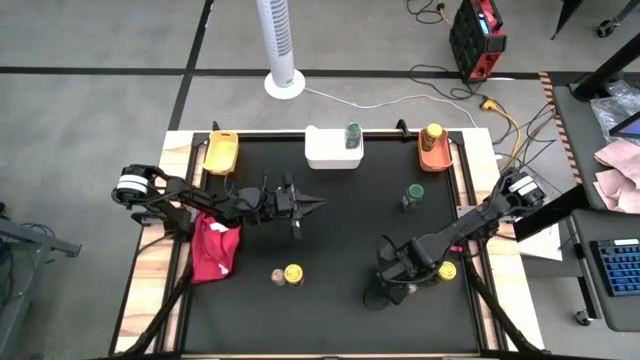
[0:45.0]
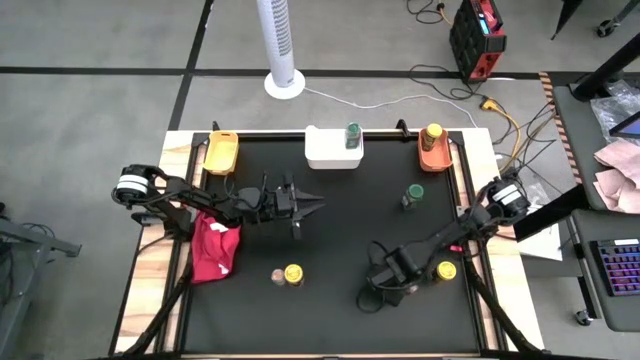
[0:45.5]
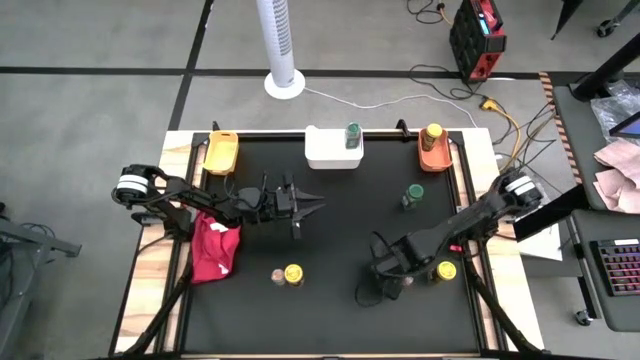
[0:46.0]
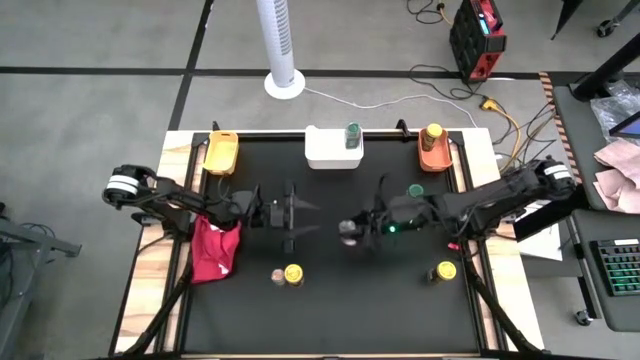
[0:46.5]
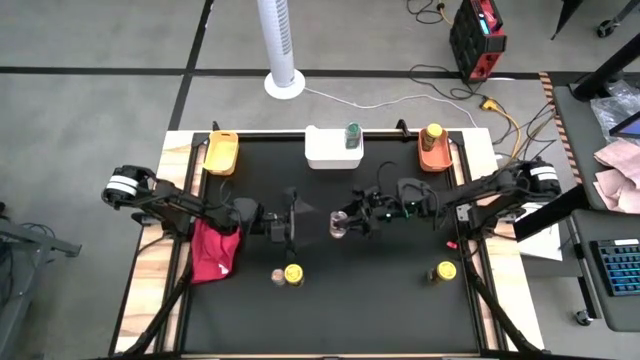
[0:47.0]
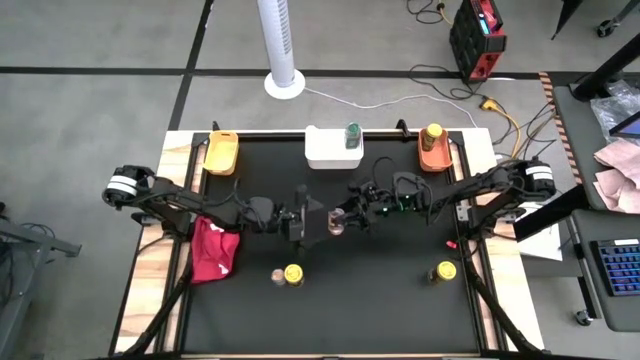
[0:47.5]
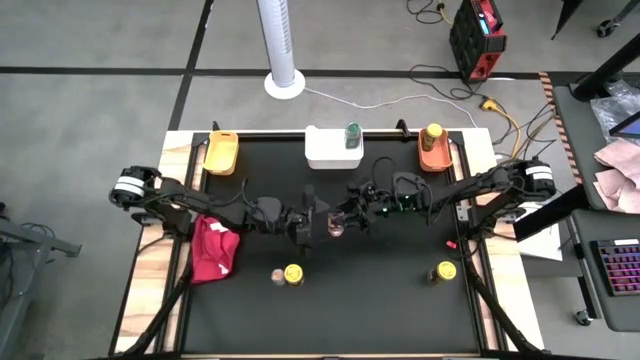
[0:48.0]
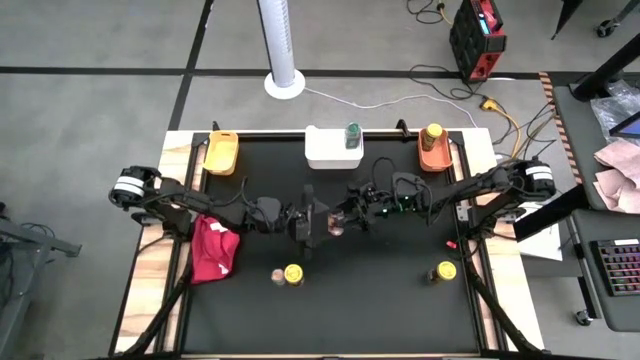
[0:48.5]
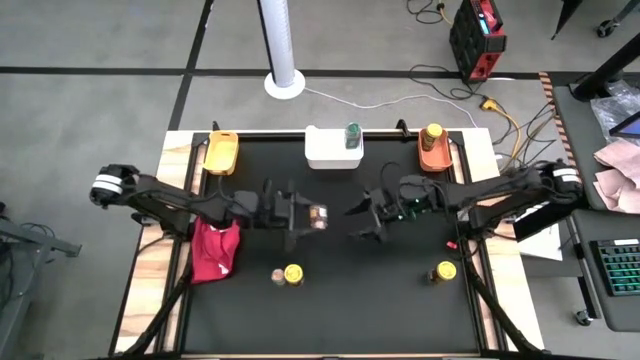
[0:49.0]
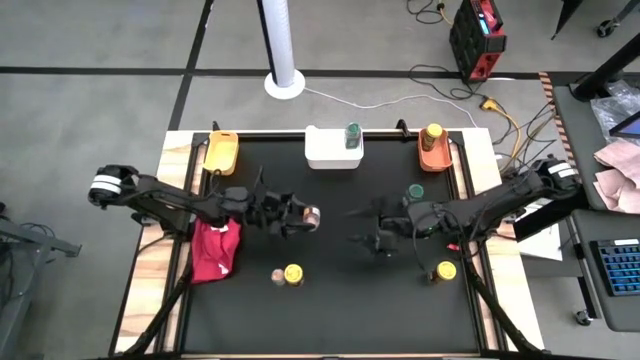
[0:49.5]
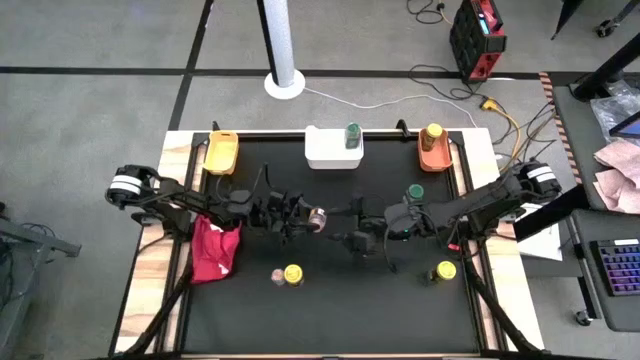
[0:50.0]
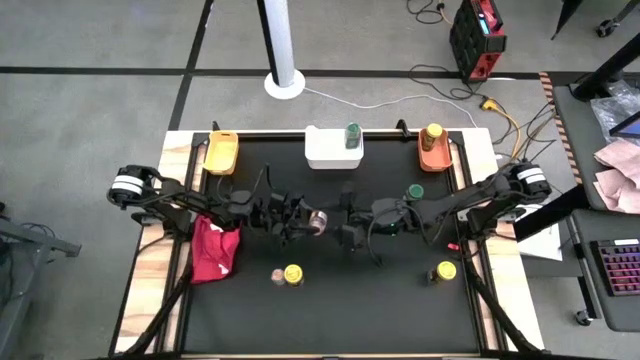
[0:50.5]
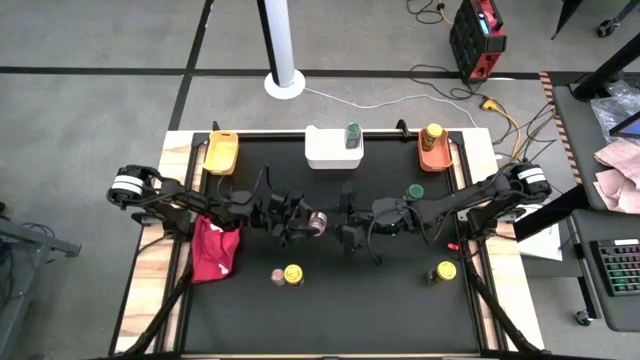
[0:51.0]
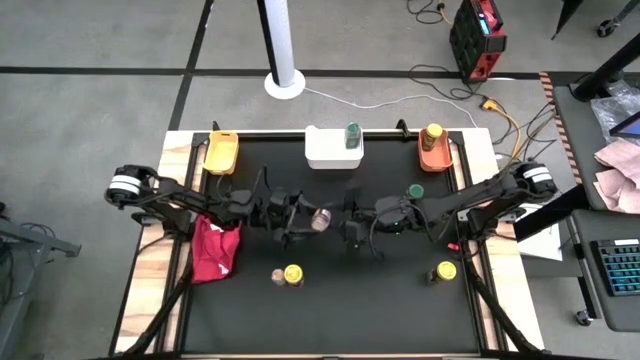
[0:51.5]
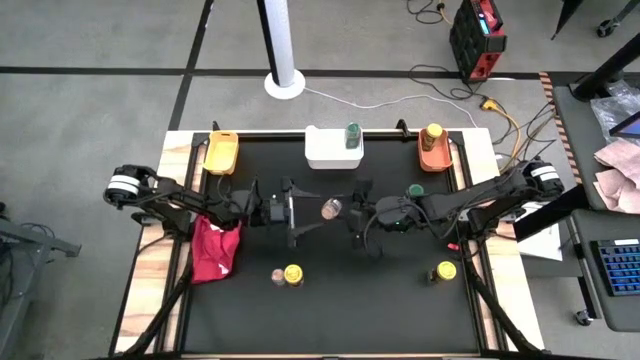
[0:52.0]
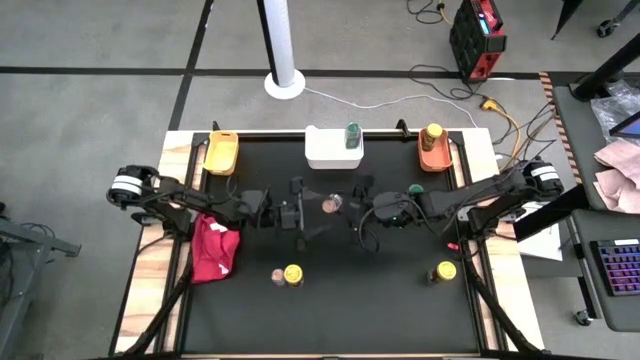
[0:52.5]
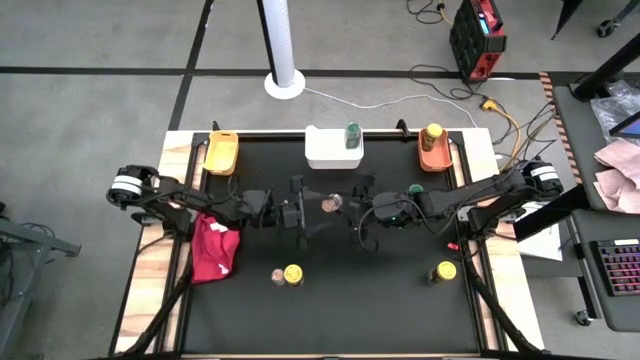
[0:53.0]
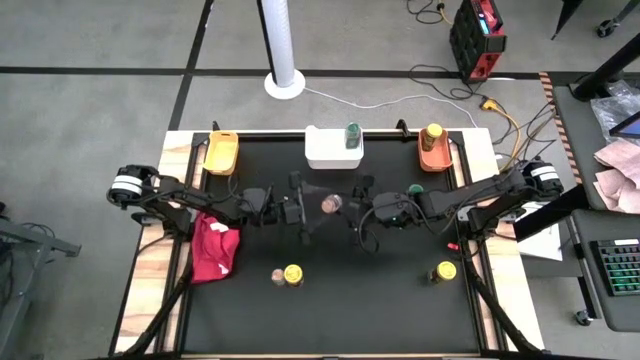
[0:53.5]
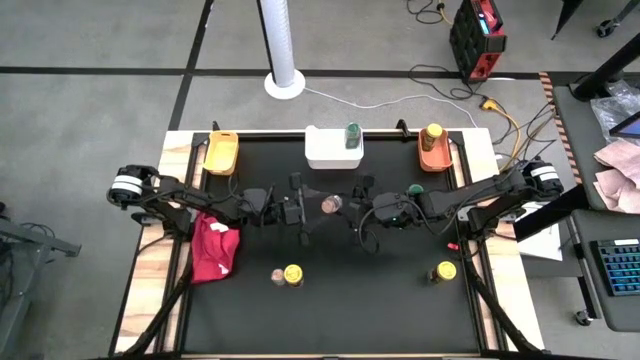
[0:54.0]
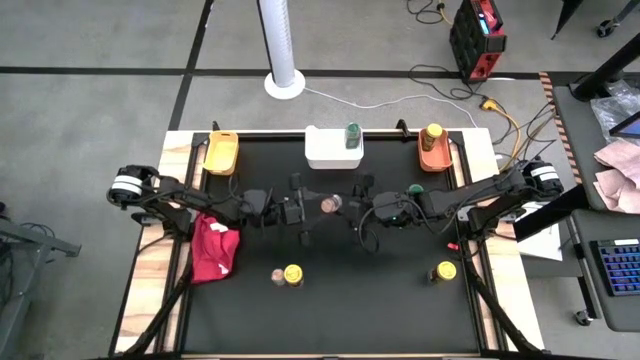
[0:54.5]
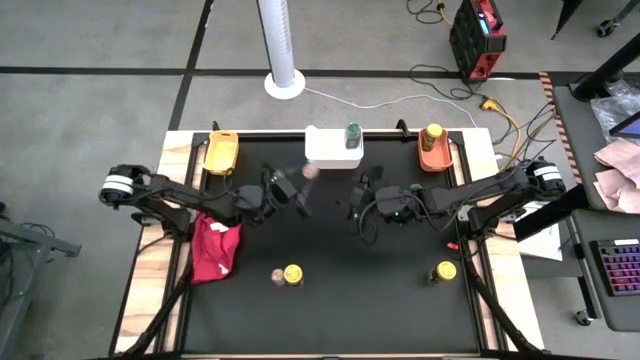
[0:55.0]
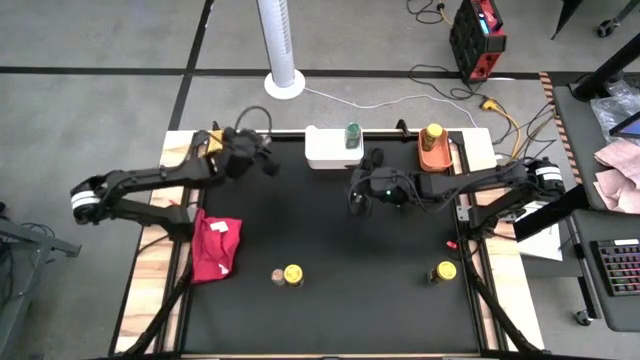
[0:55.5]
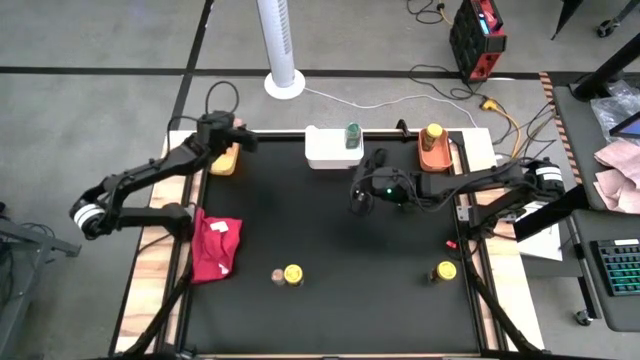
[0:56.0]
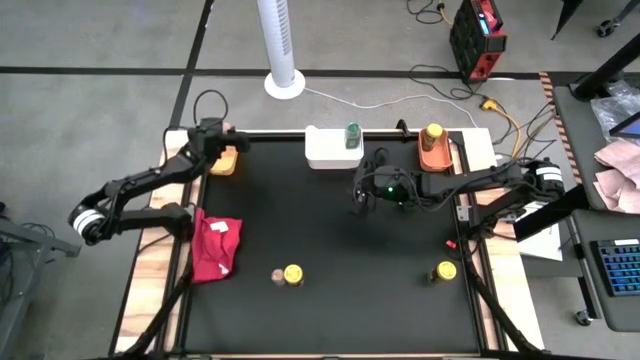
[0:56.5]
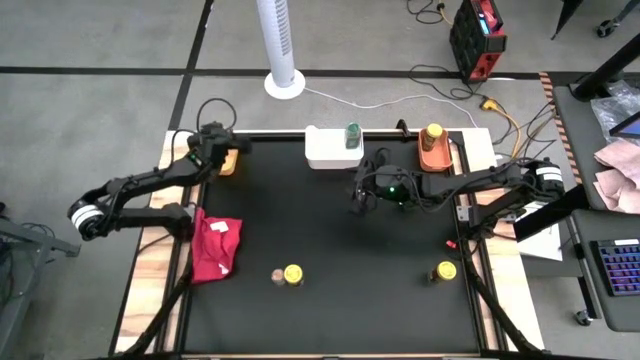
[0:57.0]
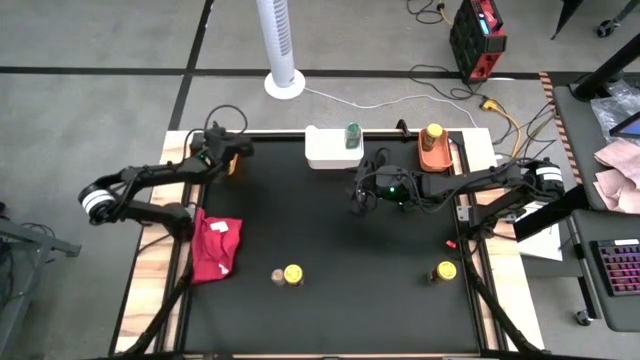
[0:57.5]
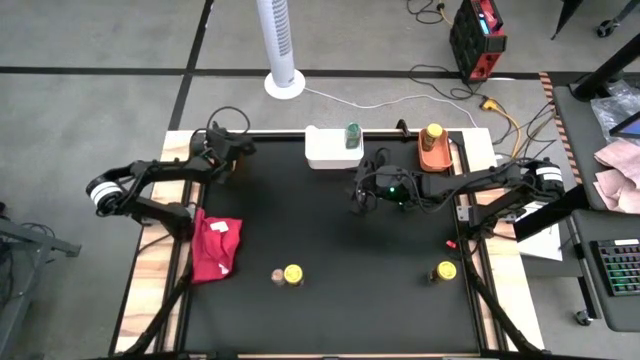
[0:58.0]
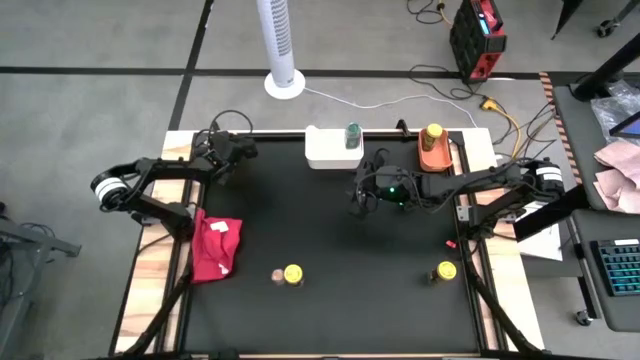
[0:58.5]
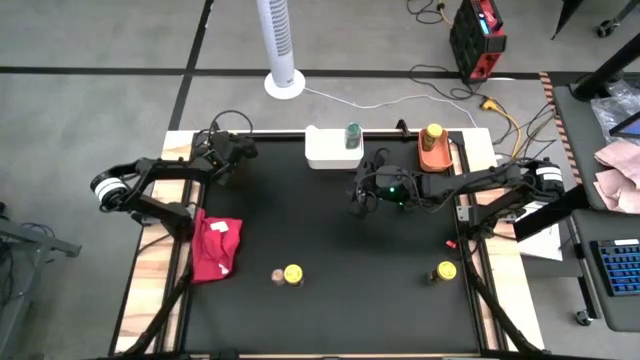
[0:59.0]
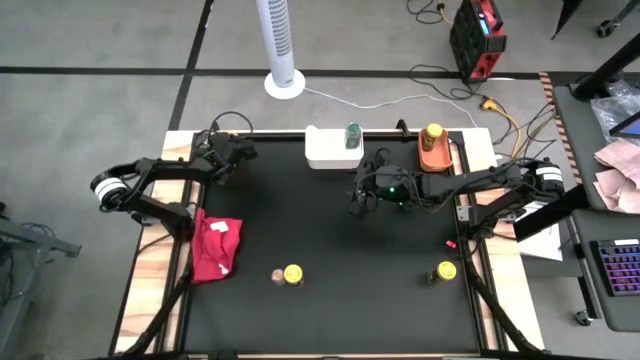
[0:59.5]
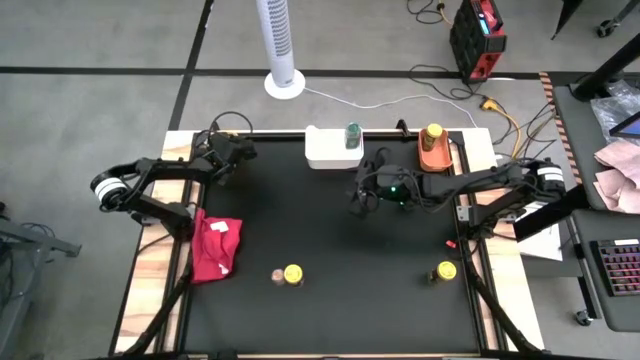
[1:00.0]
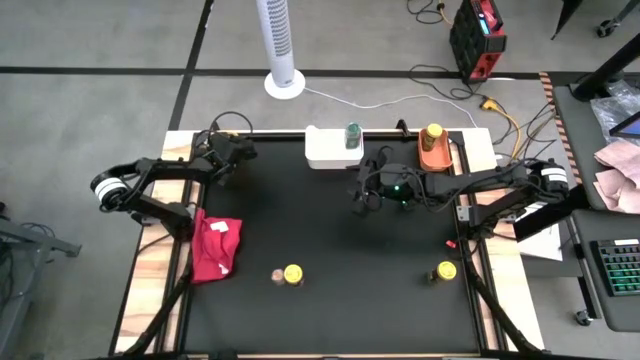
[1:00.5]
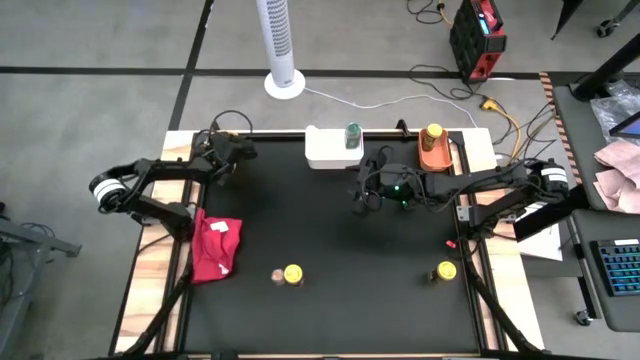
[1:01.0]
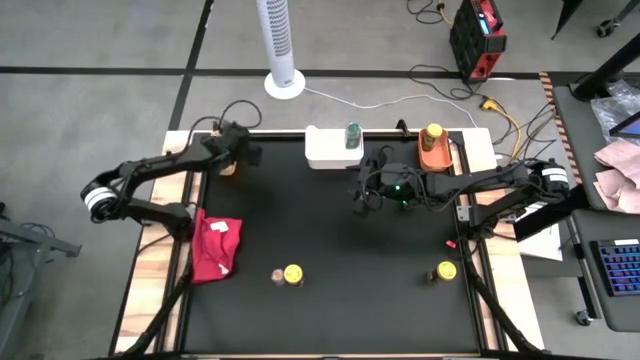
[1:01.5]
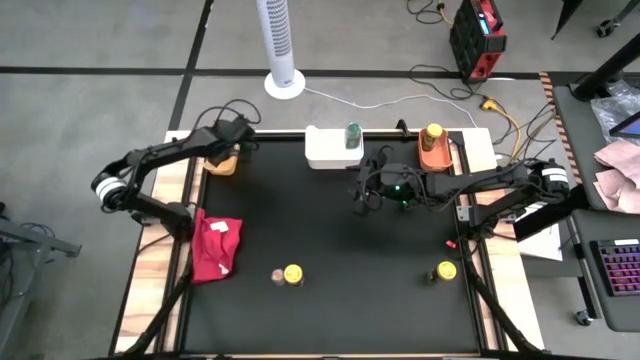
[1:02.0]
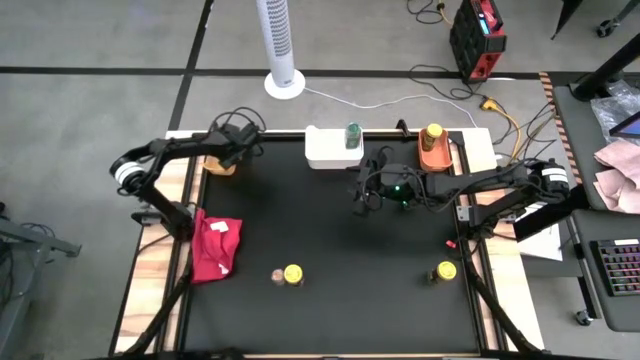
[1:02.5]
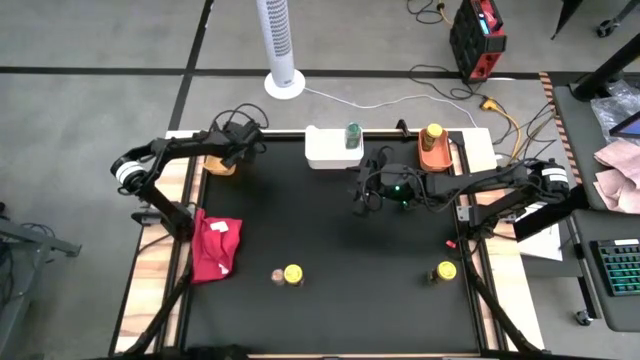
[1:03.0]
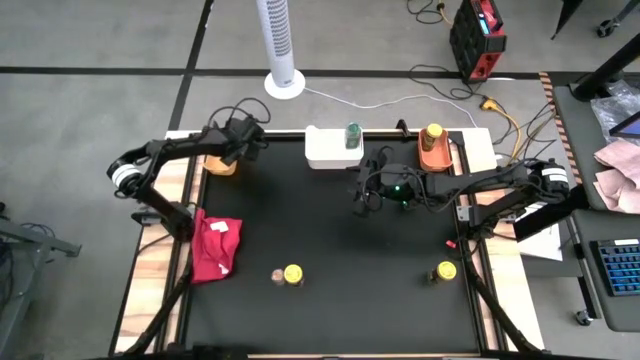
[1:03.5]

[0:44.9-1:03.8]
Task: Sort spices by type
Put the top transparent spice bottle into the yellow bin
